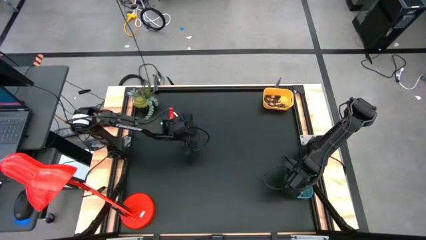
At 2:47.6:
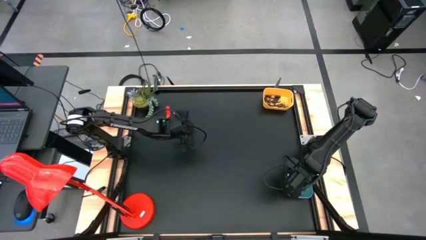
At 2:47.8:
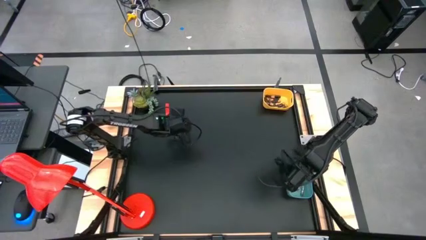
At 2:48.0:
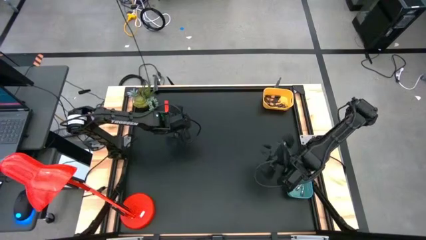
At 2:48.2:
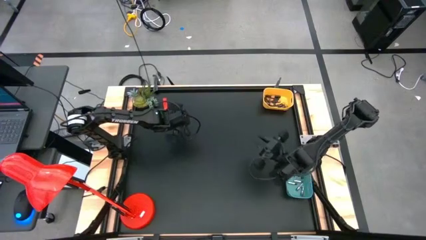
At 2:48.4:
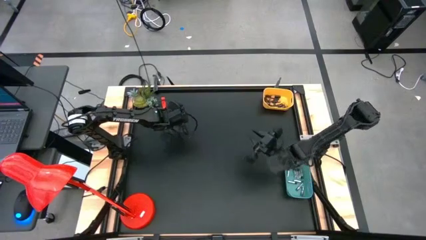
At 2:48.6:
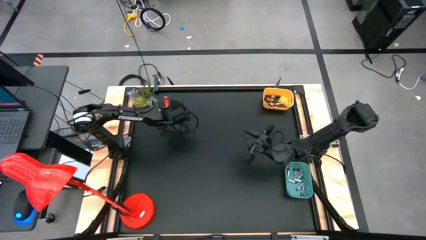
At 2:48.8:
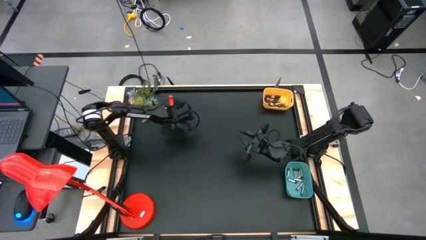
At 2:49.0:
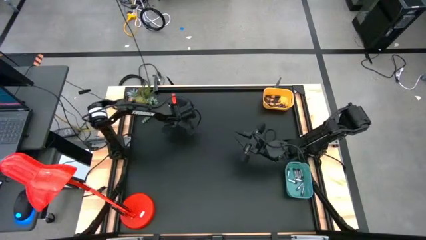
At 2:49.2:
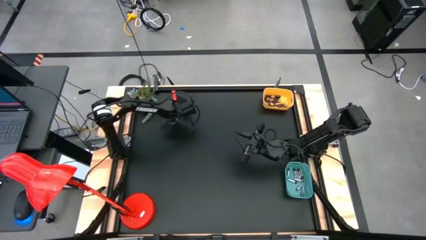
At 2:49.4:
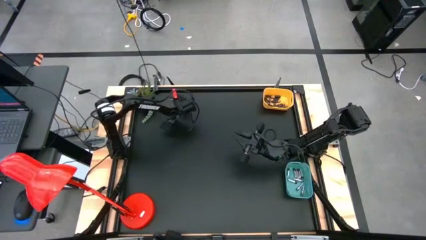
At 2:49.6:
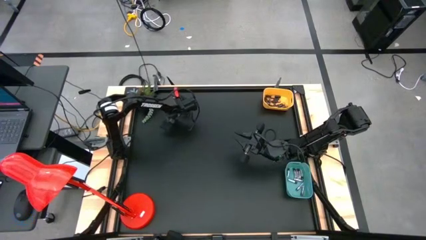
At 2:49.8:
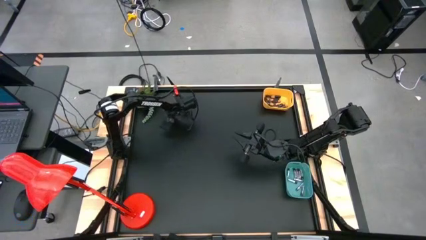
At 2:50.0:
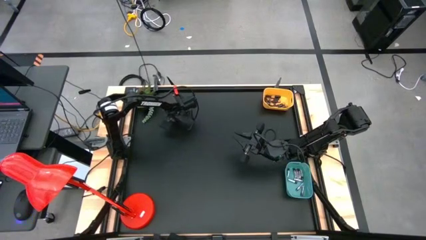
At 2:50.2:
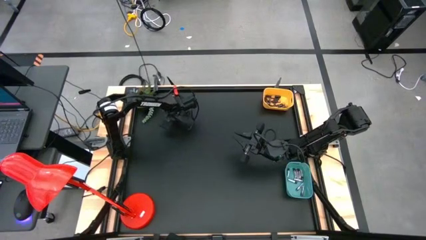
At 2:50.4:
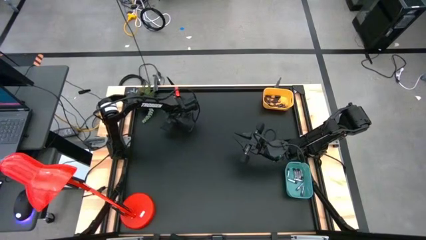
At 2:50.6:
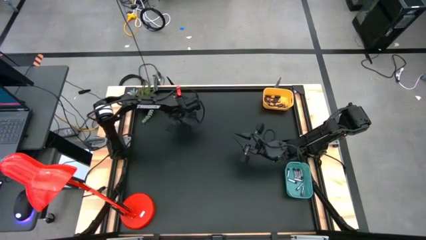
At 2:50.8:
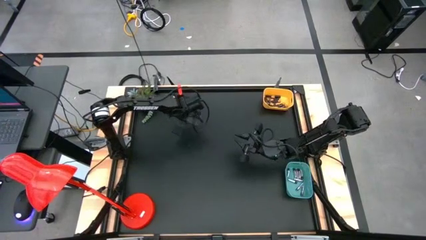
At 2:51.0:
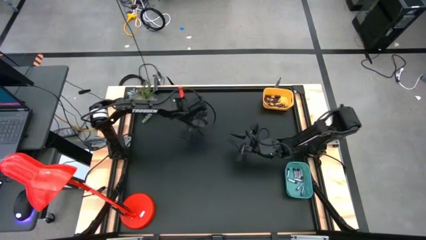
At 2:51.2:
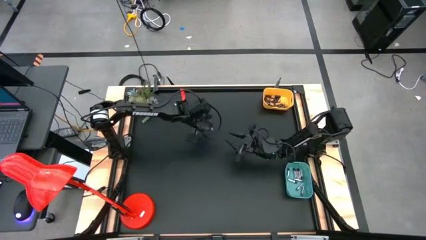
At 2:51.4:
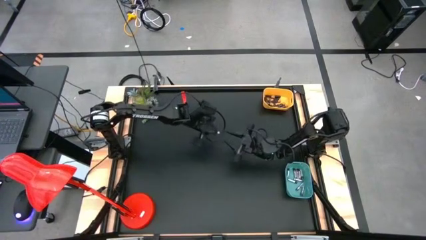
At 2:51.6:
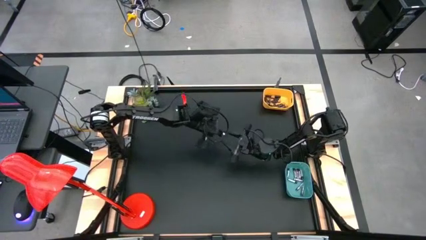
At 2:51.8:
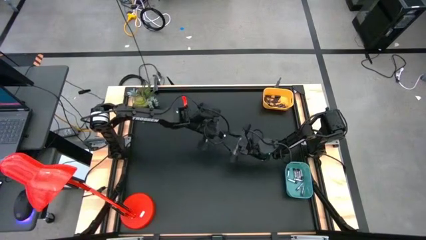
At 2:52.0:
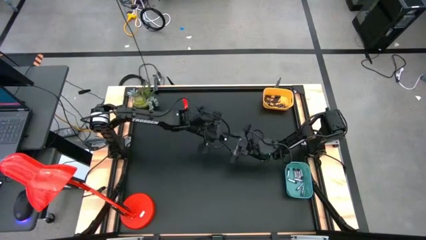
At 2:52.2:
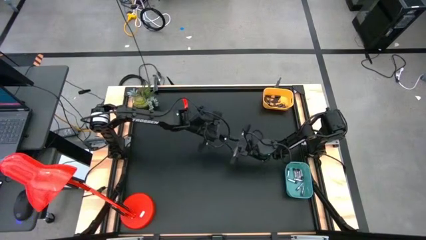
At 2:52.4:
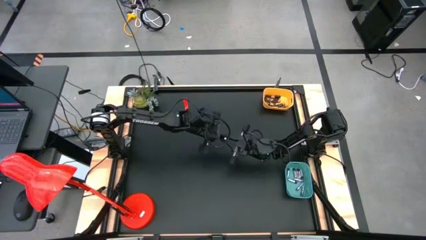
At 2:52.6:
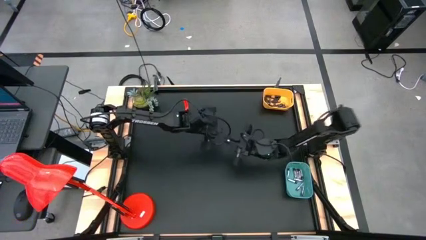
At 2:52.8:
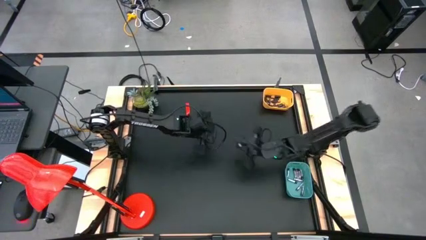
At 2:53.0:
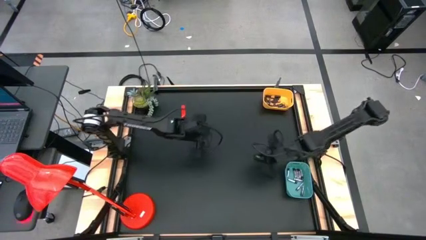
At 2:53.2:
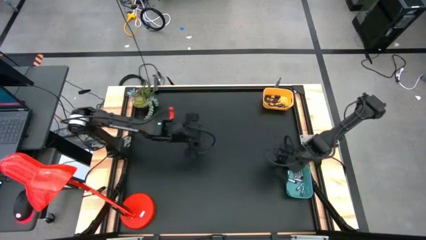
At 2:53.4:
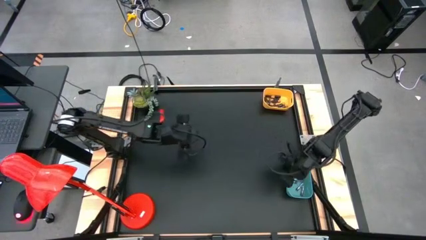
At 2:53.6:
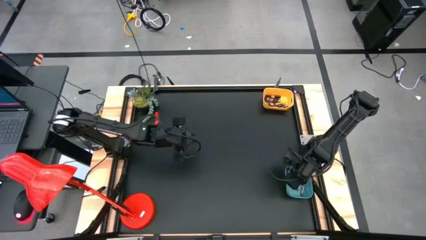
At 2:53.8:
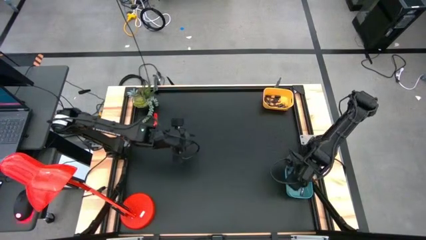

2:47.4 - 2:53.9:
Task: Sort batteries
Put the silver battery into the green bin

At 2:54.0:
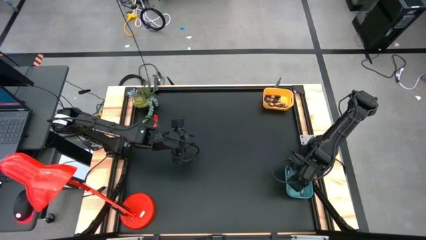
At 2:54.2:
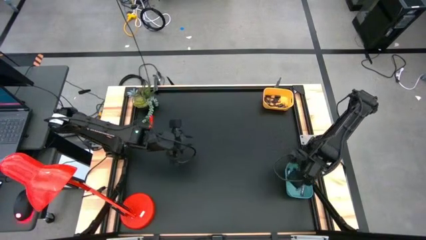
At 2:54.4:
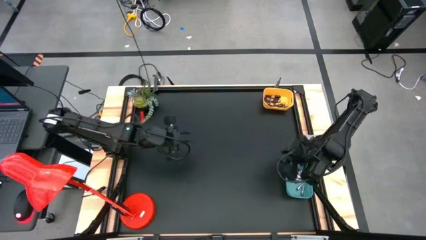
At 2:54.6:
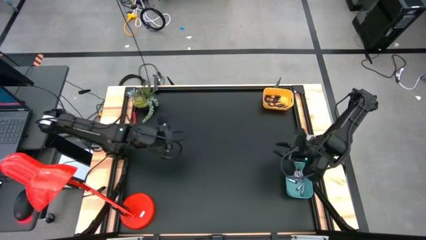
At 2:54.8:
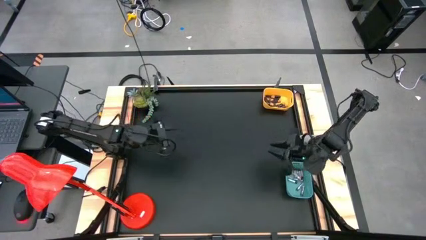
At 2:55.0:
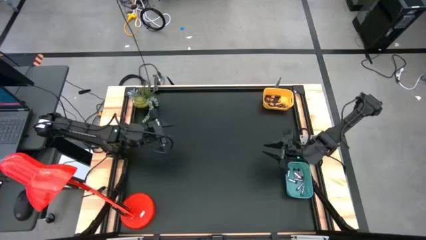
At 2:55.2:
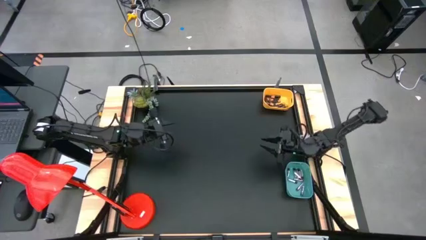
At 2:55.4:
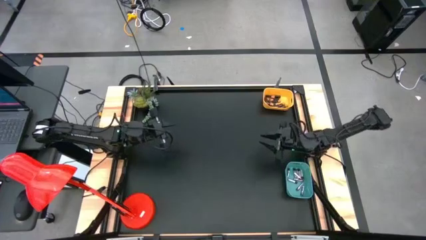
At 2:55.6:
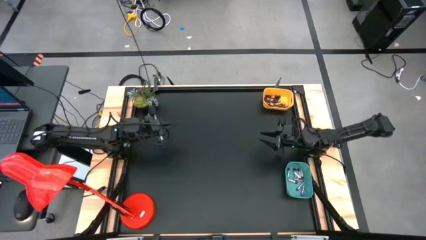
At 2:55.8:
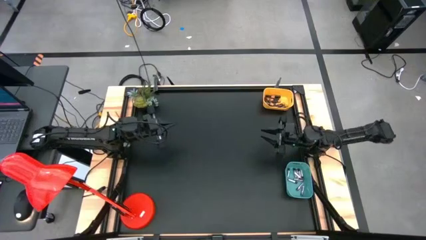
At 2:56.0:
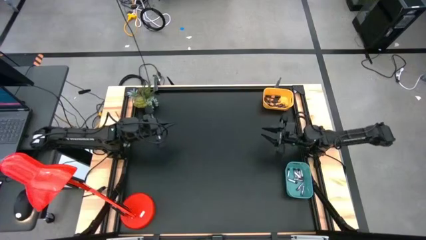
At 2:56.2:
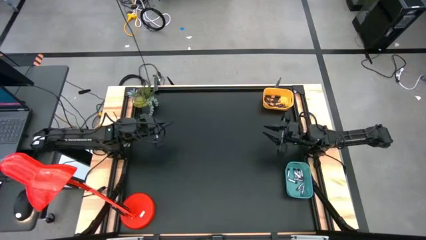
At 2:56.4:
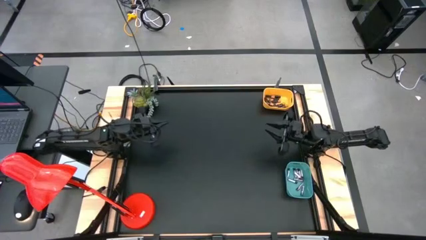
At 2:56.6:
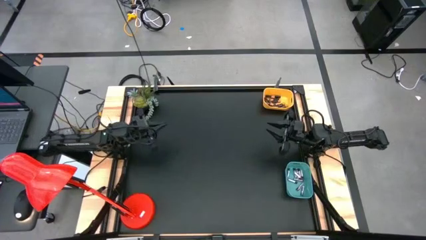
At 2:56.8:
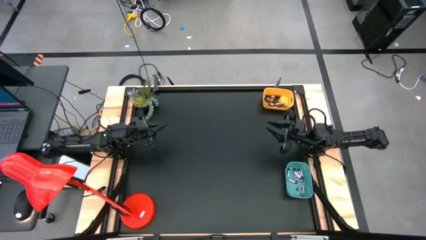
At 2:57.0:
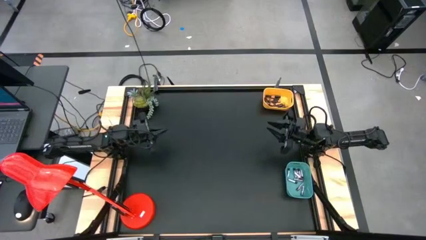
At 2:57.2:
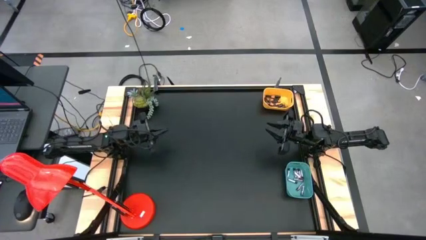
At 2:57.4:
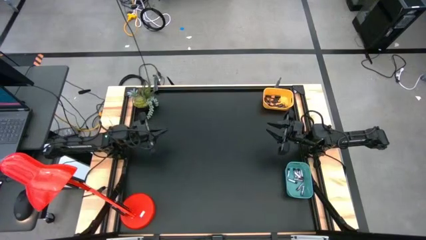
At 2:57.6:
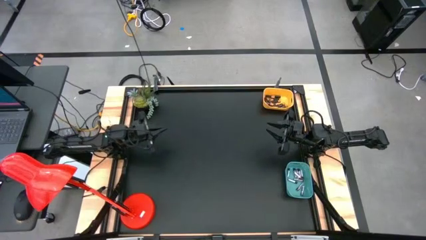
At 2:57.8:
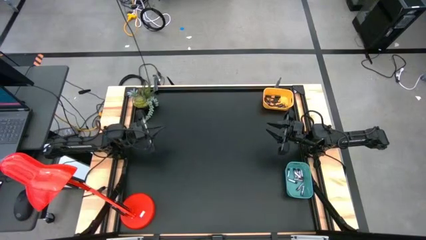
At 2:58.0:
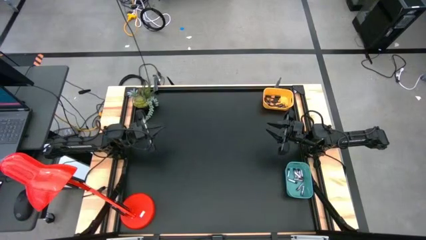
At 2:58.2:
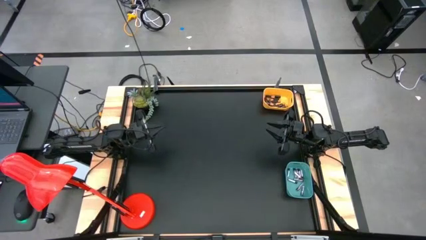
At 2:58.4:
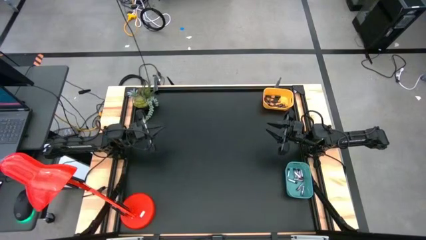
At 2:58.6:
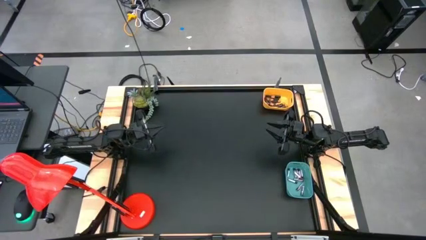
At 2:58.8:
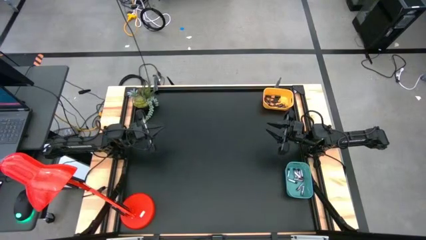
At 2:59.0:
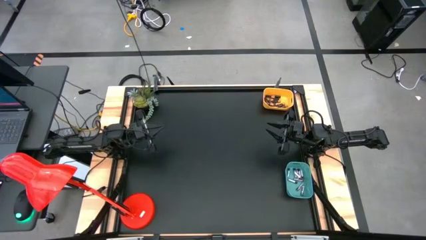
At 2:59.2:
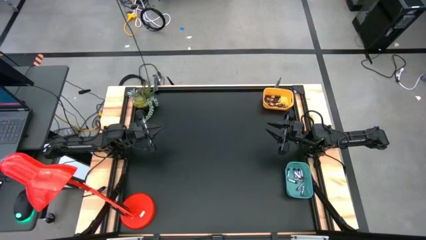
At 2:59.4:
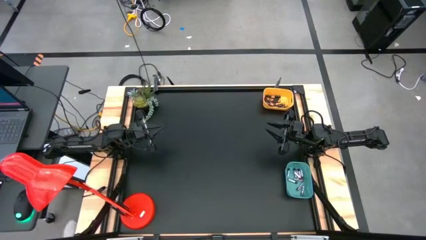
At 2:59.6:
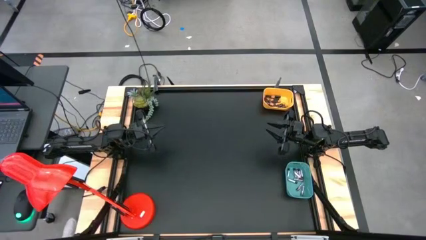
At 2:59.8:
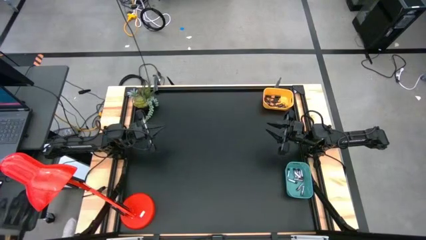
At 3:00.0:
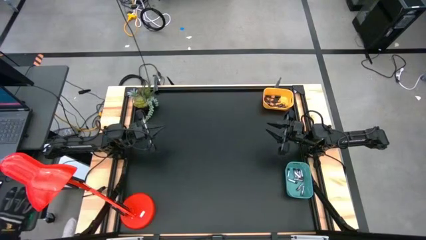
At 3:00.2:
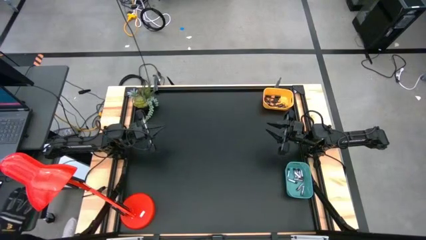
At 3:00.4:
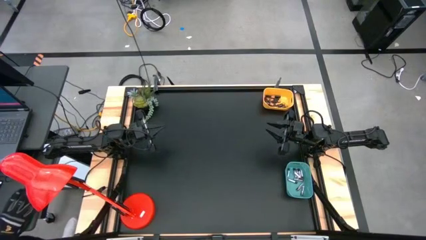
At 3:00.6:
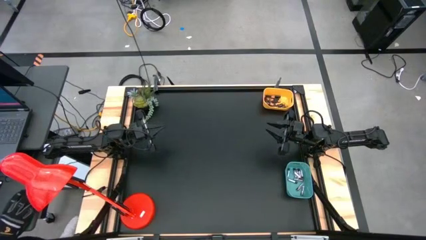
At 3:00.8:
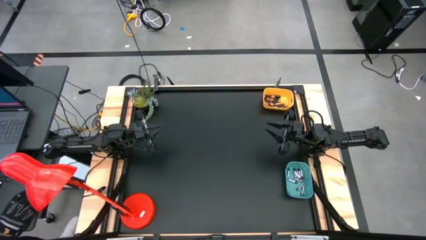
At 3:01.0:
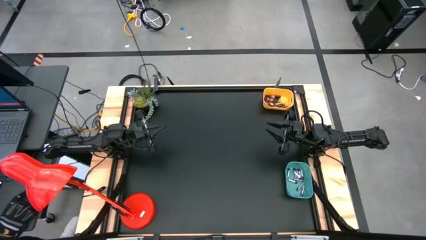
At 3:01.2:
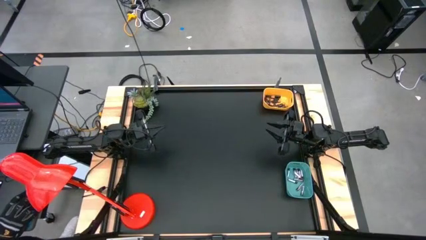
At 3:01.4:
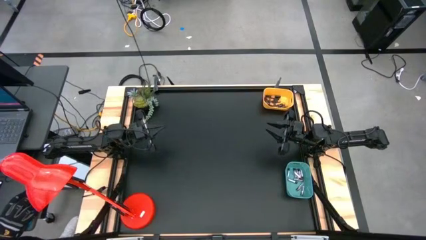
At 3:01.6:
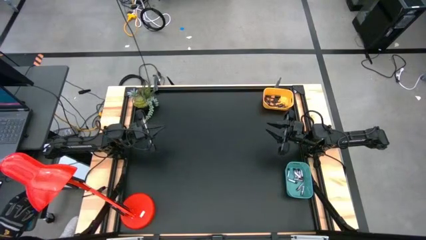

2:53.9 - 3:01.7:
Return to Home Position

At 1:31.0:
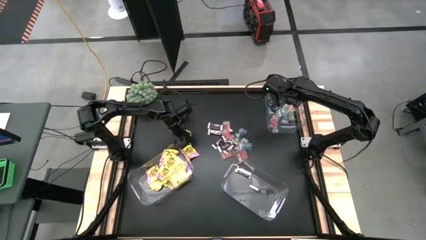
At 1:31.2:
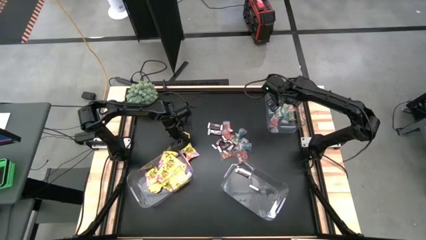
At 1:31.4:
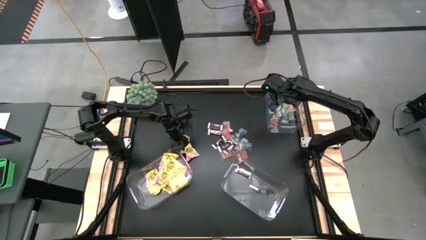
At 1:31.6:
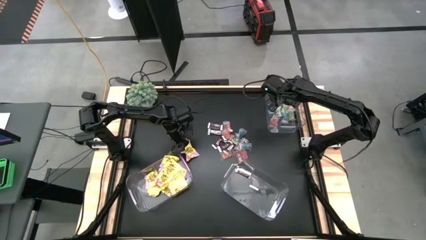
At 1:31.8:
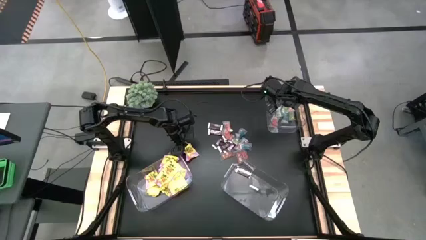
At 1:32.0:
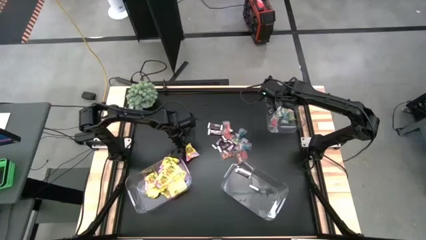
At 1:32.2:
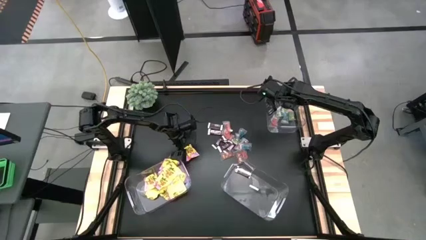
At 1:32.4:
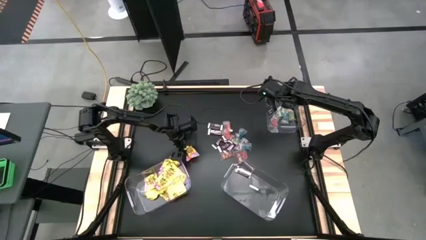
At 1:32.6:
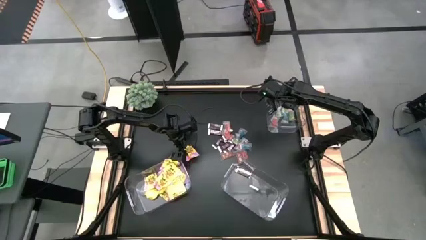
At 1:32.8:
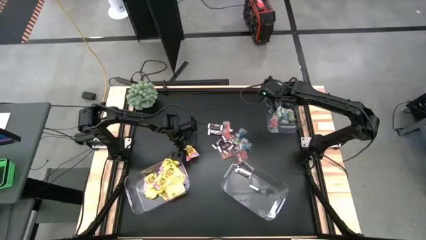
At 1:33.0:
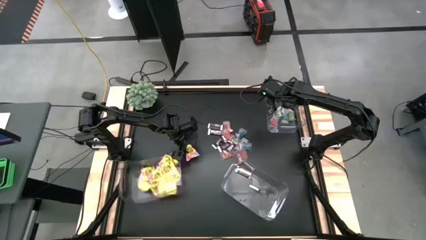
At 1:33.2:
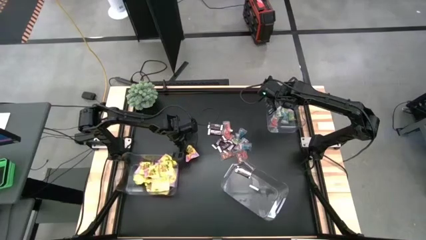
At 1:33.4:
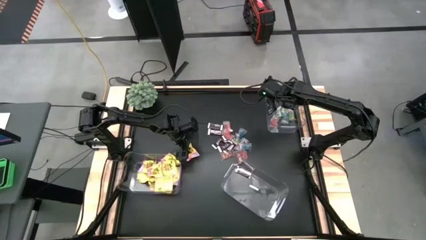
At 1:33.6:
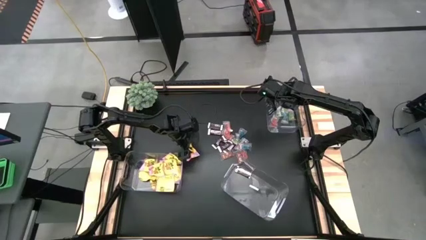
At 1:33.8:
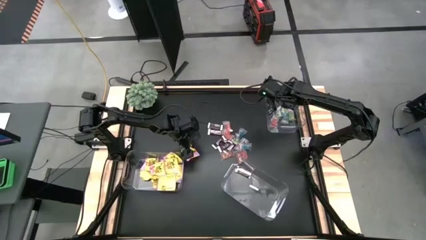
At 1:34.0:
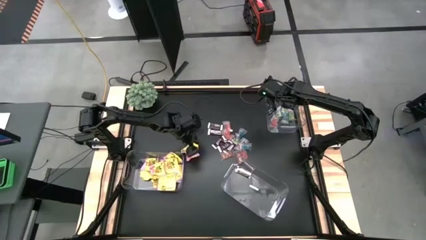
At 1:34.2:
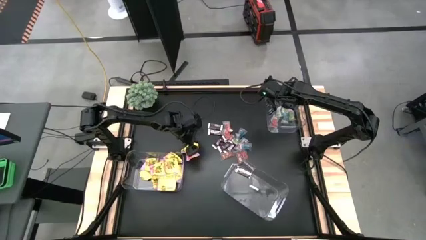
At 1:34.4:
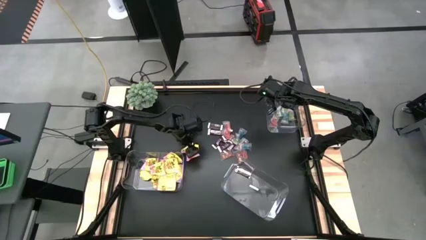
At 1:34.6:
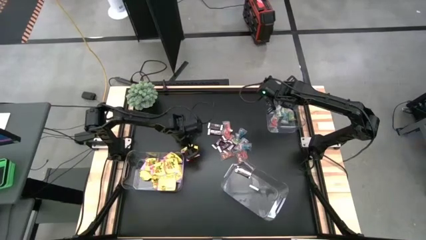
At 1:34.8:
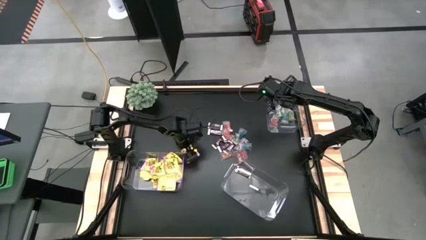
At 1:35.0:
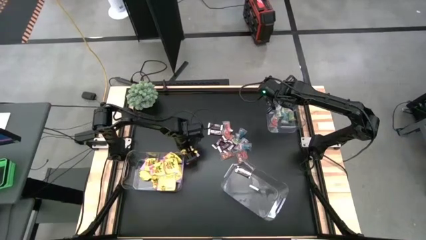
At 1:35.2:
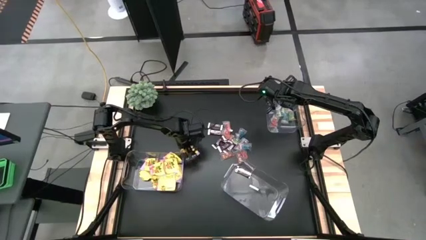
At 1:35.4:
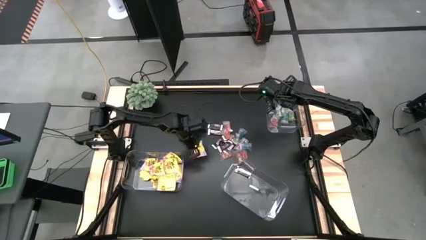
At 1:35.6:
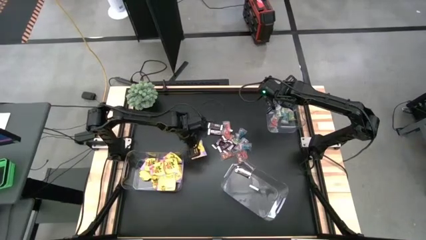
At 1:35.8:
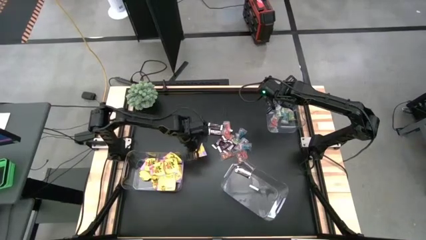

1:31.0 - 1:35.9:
Task: Sort candy
Put the yellow candy in the bottom left transparent container
